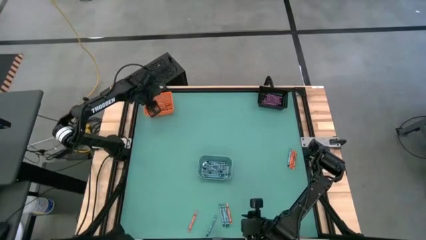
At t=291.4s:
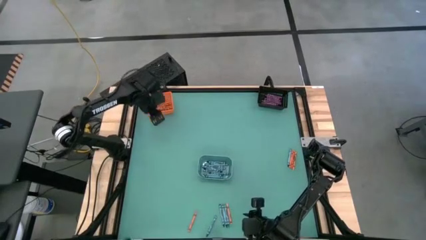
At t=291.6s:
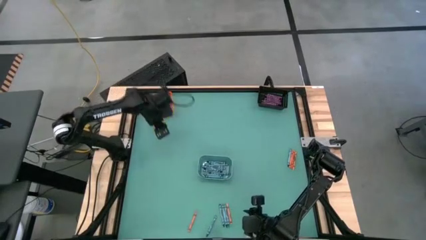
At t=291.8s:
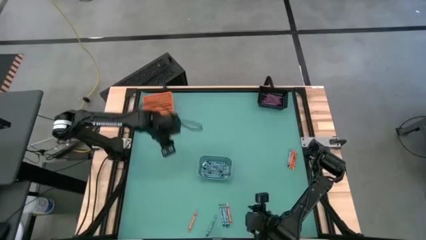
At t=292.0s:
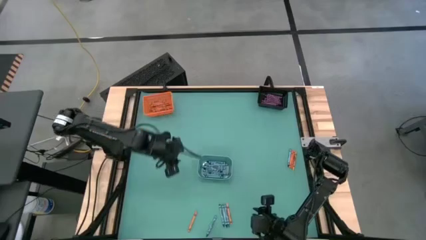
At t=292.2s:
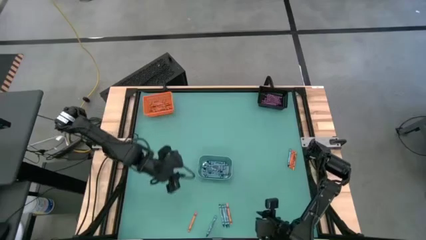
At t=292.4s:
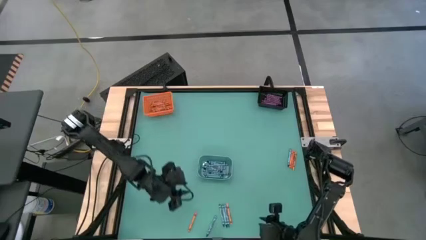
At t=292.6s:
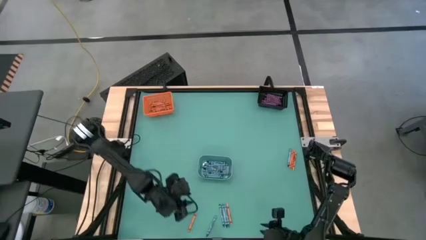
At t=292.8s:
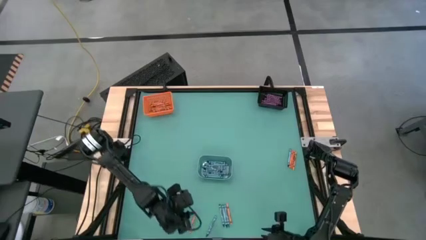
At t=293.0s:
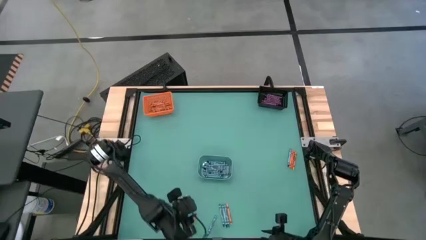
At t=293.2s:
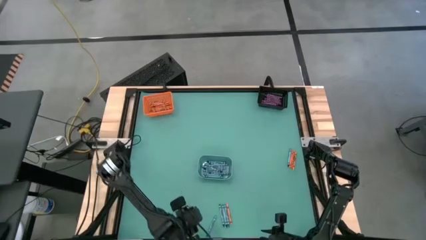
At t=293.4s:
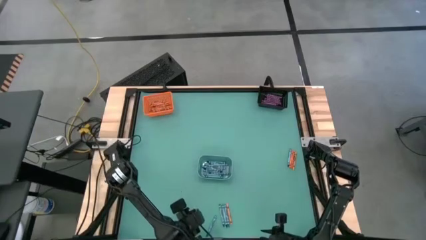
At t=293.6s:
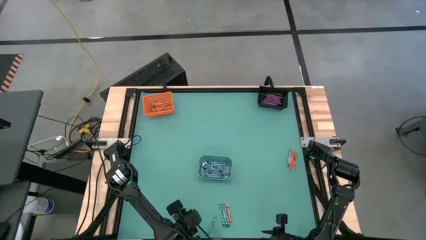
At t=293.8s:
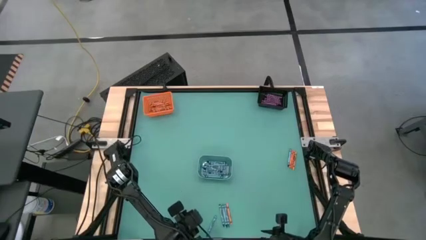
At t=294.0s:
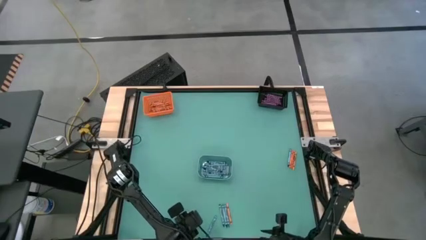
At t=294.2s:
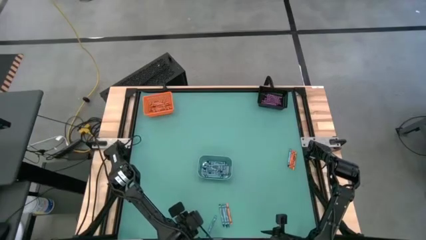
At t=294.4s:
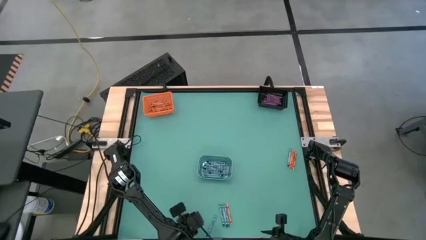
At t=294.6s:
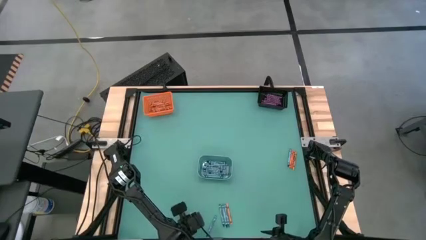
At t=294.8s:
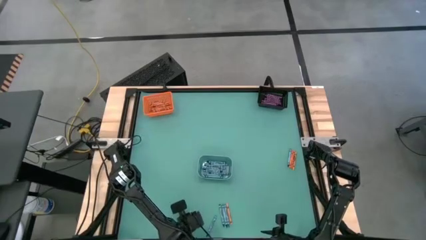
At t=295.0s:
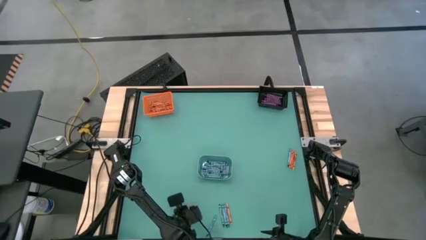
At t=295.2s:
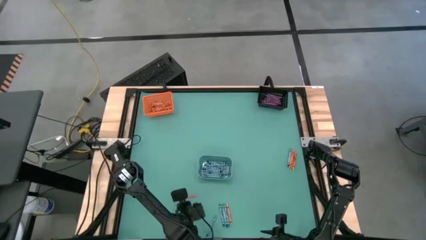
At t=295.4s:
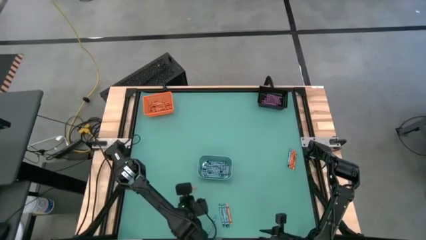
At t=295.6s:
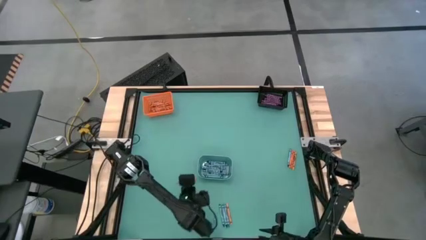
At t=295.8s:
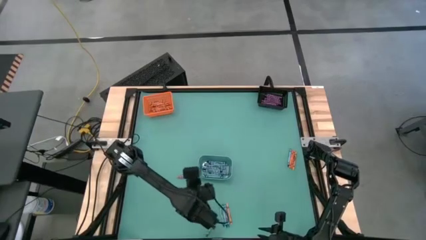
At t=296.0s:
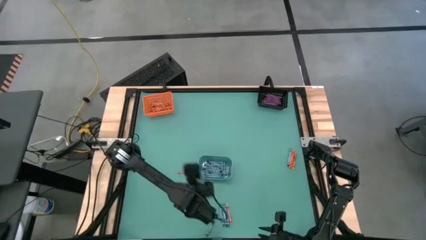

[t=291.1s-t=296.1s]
Task: Sort crayons
Put the orange crayon into the orange bin

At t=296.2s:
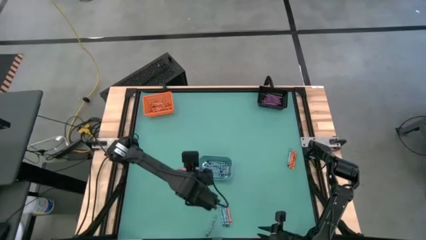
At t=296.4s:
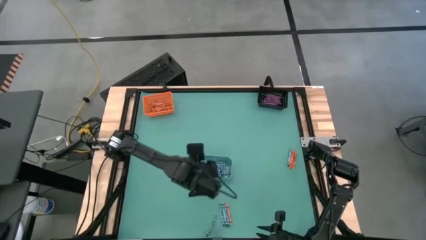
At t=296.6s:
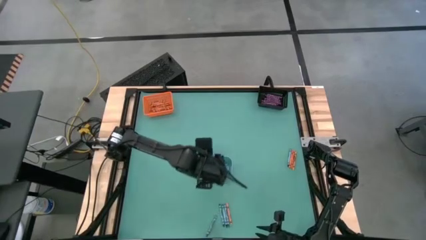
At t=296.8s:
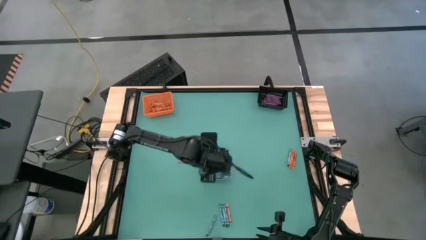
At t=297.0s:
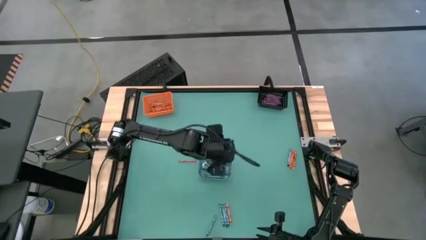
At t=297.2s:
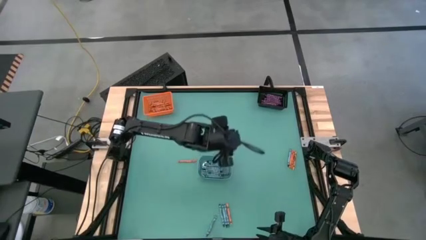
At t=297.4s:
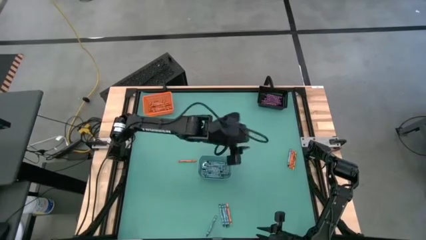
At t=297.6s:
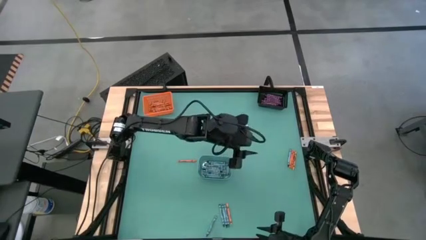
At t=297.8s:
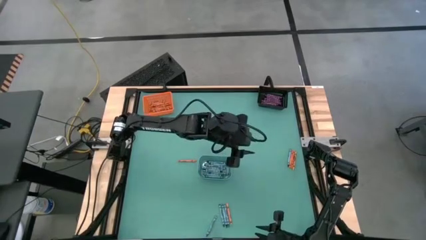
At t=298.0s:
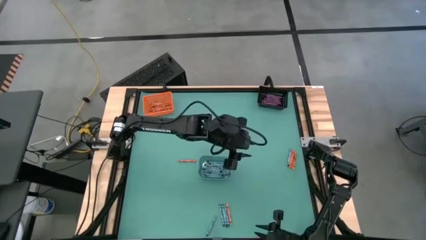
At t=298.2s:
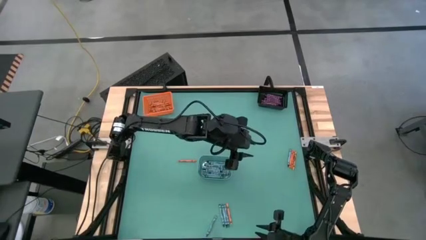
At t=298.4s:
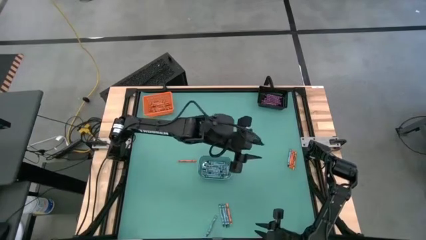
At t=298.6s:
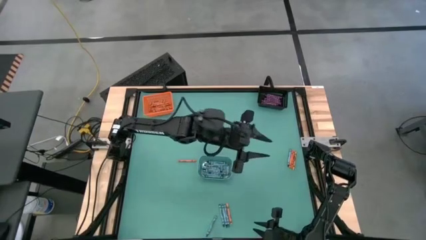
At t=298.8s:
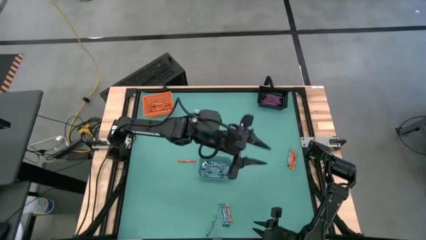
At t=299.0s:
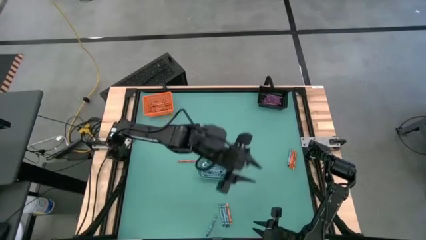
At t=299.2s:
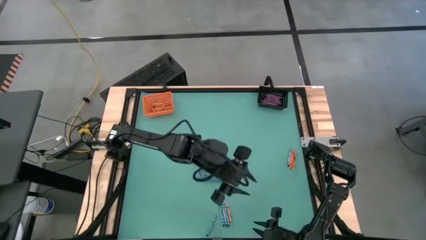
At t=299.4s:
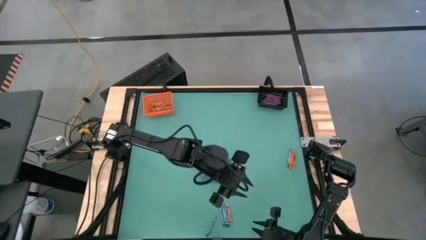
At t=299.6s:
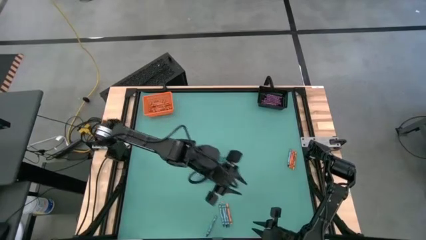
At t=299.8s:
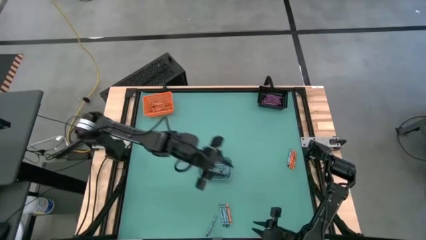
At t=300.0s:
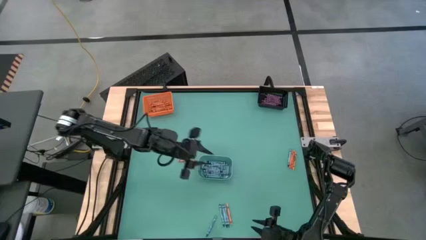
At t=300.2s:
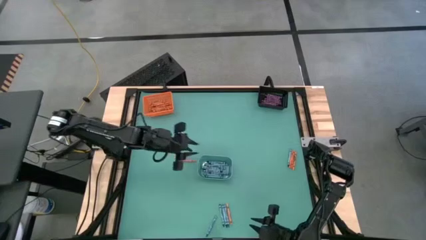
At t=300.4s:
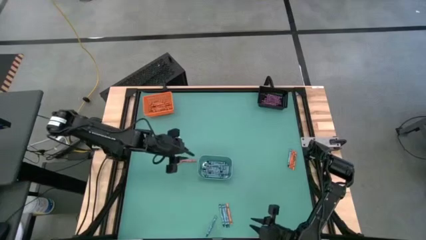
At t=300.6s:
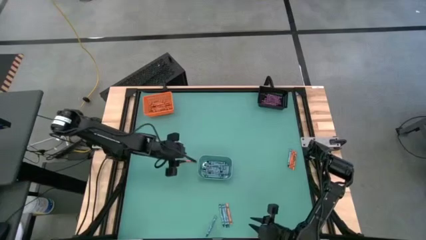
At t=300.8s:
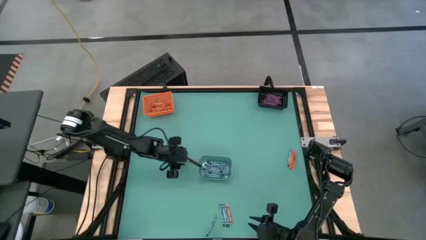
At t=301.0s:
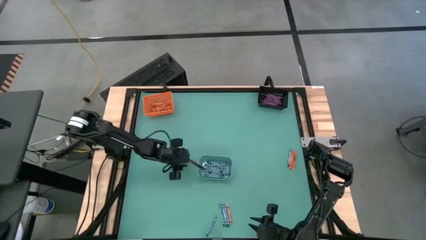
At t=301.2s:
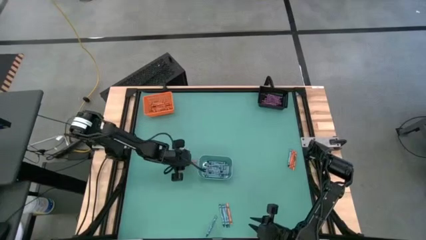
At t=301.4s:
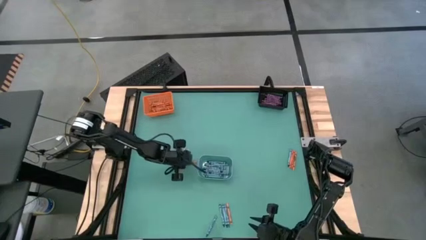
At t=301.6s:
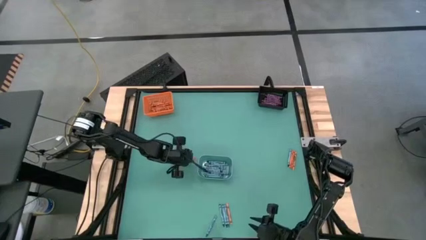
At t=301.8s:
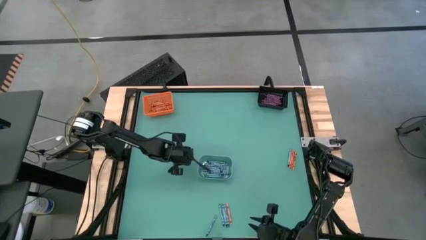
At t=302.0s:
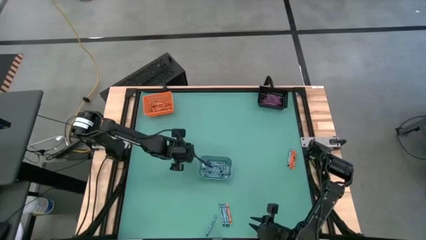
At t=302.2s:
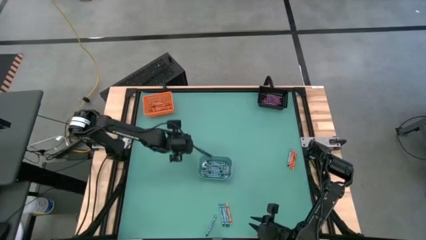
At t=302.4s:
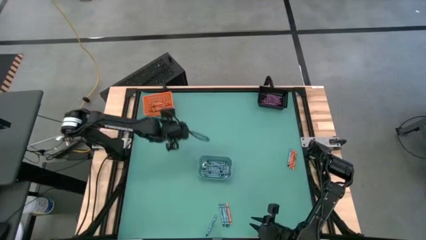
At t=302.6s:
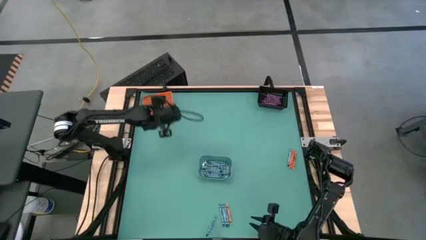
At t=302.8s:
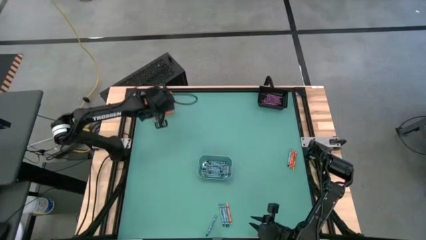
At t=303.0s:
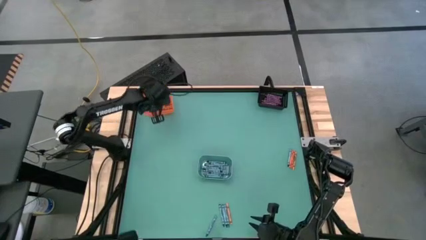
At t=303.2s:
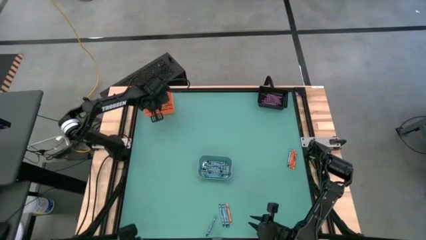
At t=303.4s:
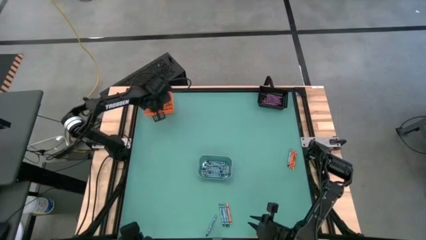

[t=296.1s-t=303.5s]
Put the orange crayon into the orange bin

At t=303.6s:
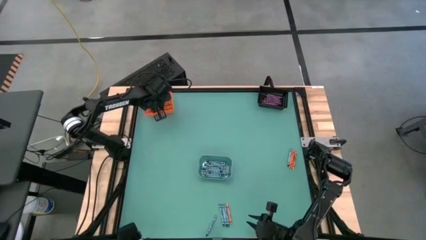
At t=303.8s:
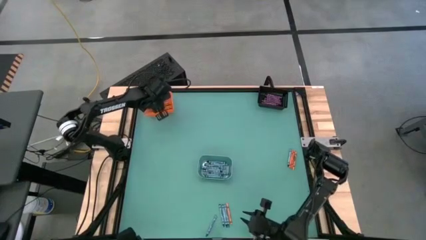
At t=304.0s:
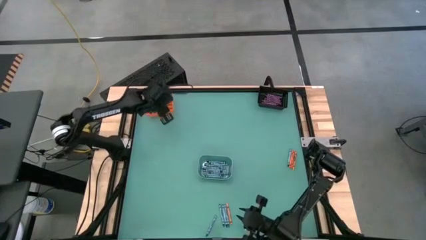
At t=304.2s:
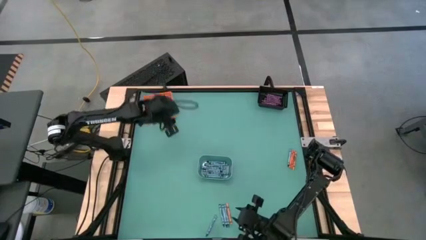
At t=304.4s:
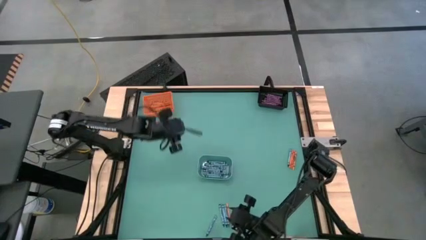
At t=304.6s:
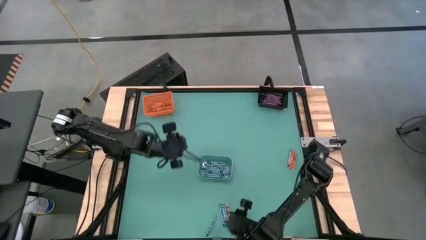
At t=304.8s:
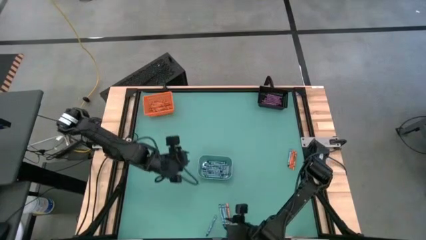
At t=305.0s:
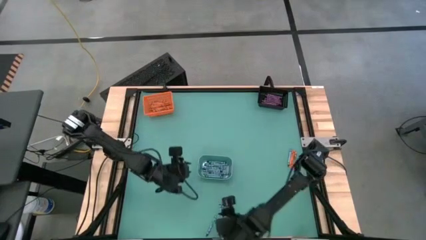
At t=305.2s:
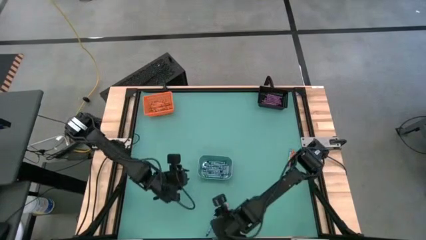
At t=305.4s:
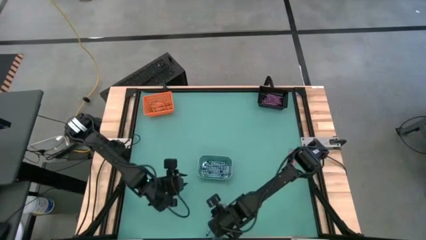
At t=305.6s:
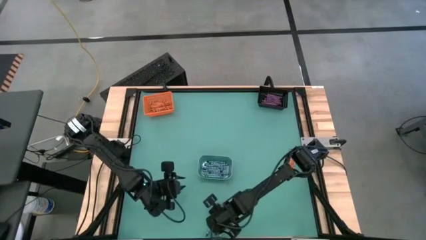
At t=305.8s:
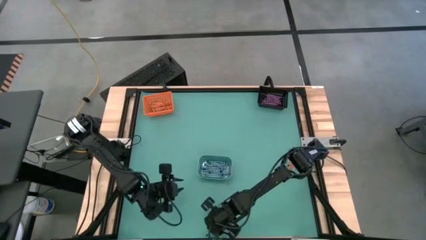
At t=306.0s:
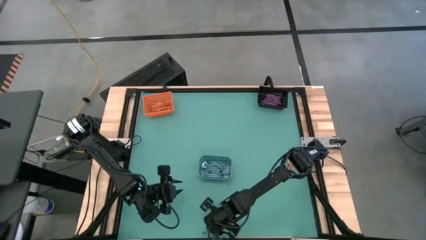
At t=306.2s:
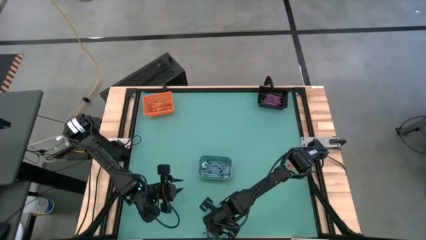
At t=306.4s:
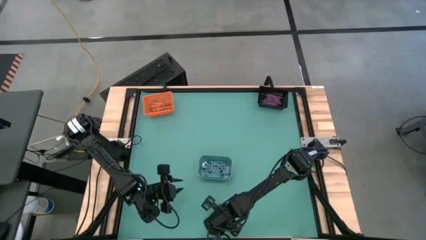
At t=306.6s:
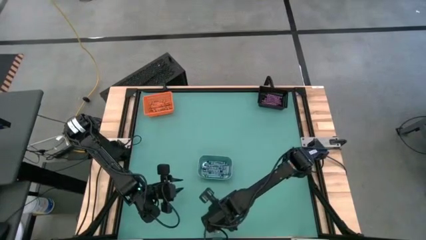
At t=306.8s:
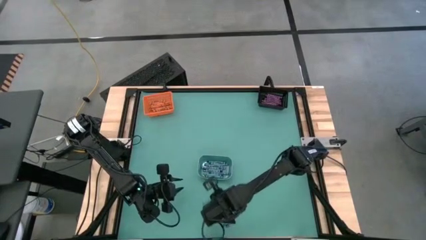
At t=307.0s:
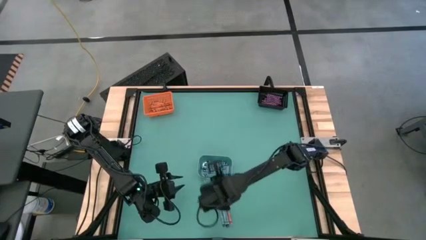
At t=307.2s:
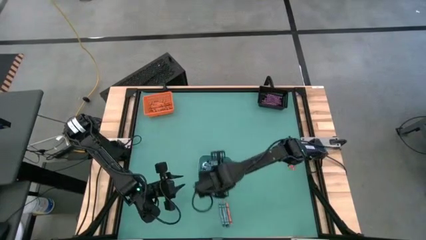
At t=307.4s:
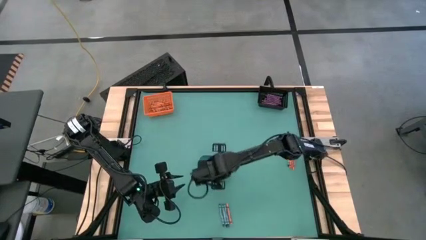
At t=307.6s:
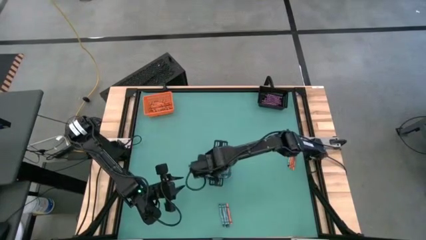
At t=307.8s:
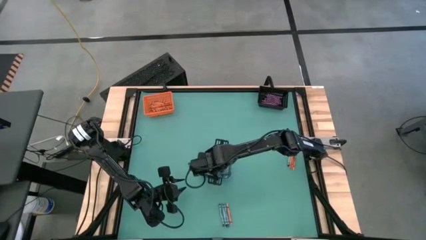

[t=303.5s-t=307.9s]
Put the light blue crayon into the blue bin
